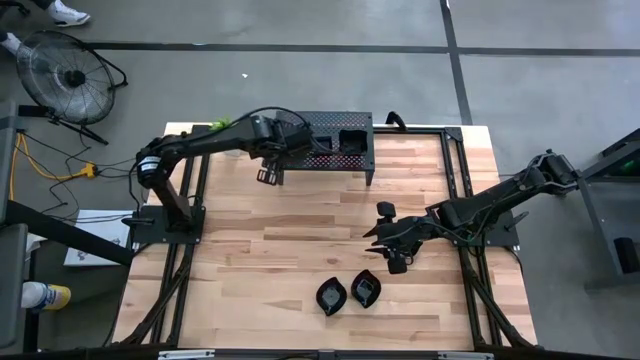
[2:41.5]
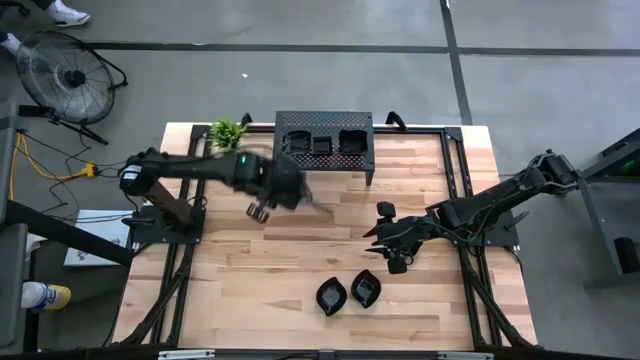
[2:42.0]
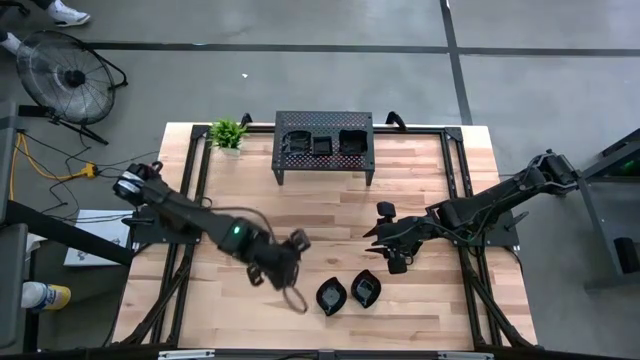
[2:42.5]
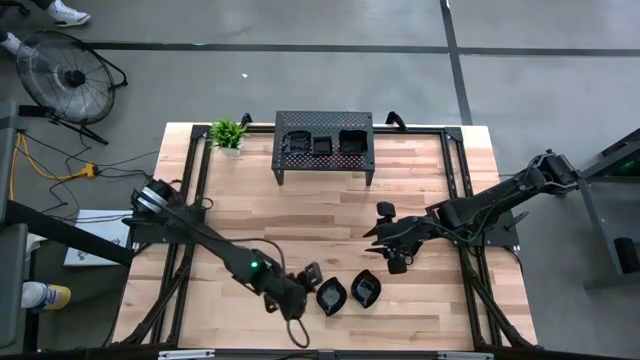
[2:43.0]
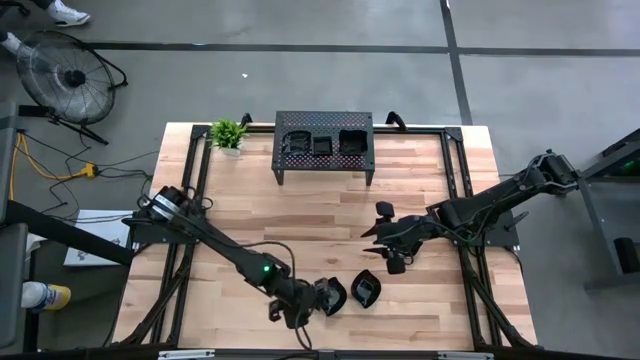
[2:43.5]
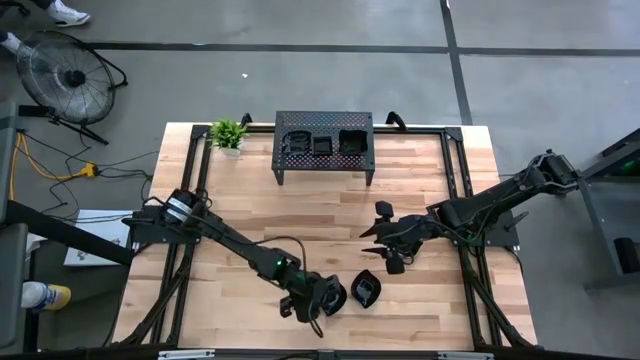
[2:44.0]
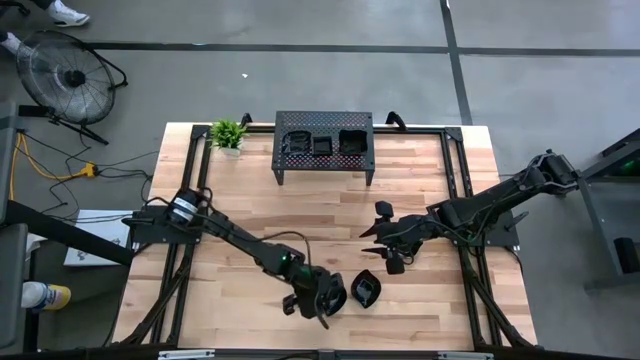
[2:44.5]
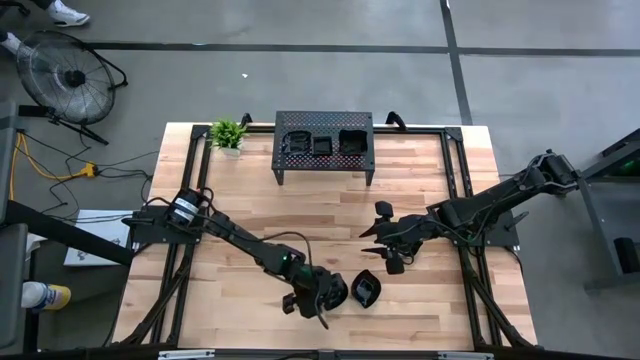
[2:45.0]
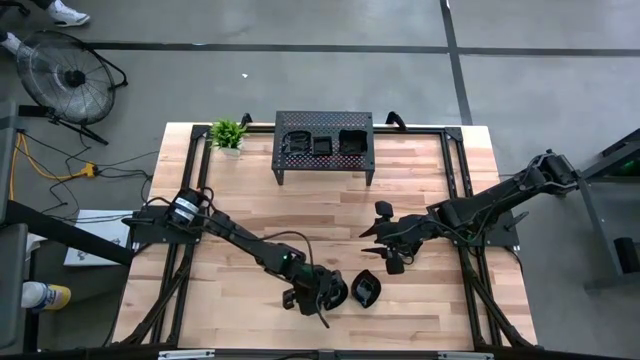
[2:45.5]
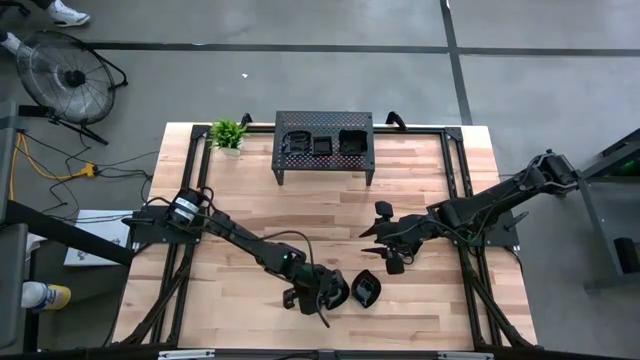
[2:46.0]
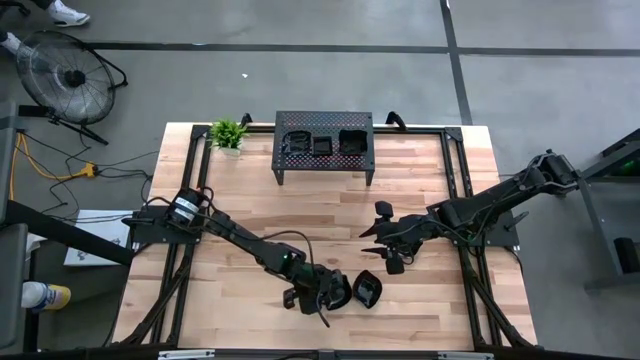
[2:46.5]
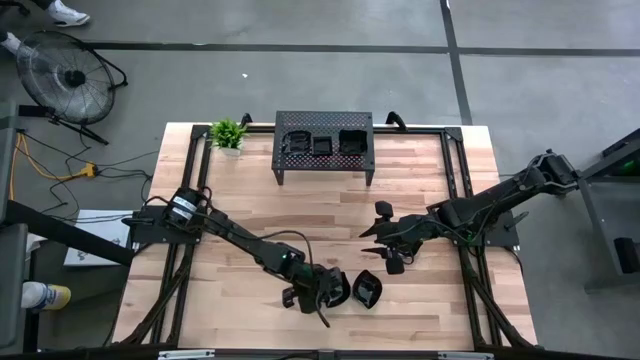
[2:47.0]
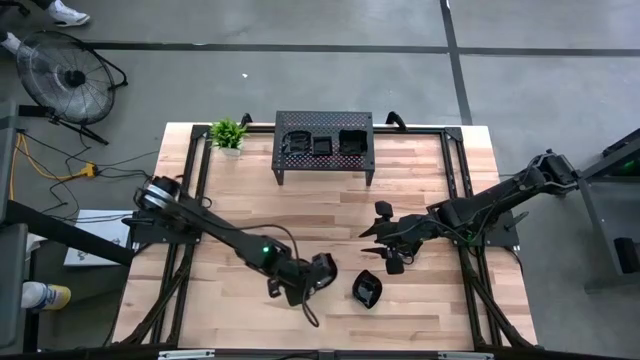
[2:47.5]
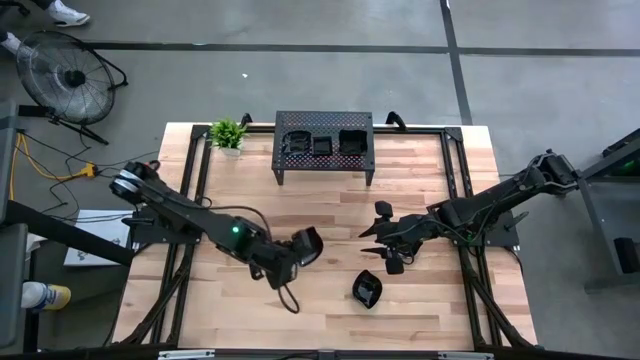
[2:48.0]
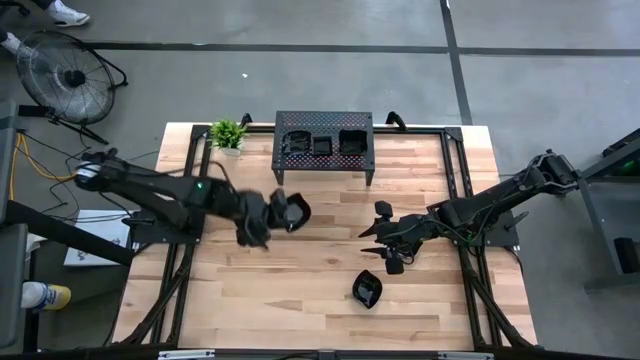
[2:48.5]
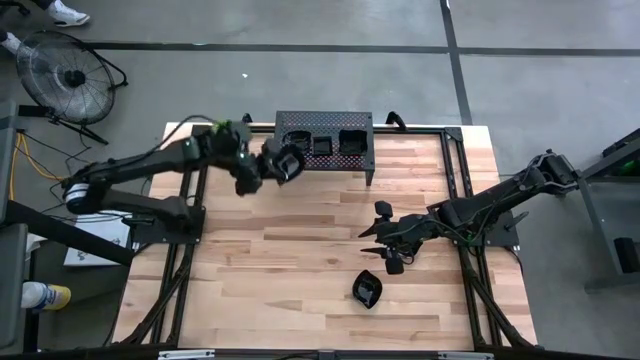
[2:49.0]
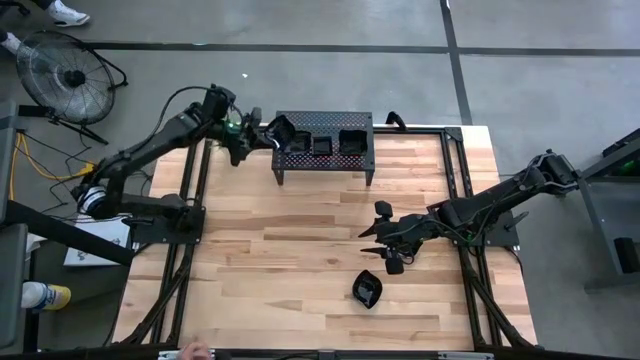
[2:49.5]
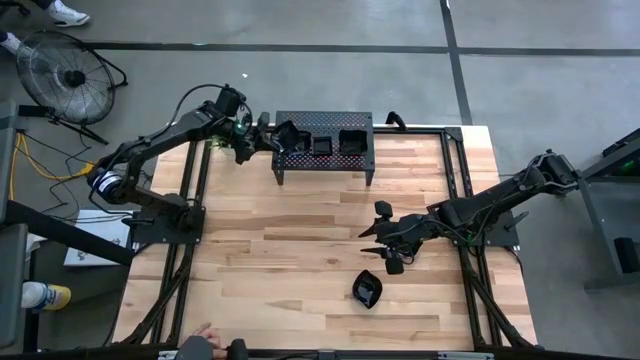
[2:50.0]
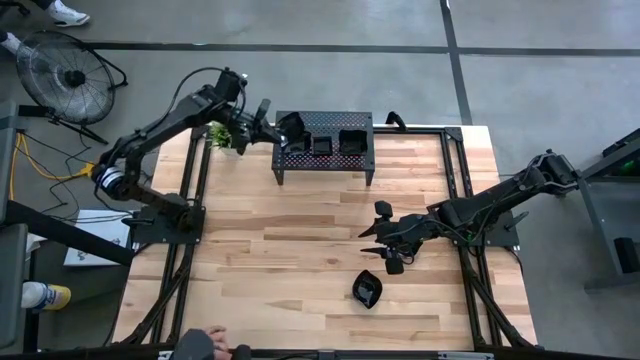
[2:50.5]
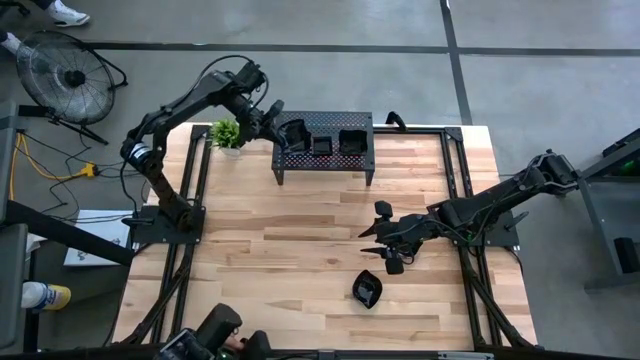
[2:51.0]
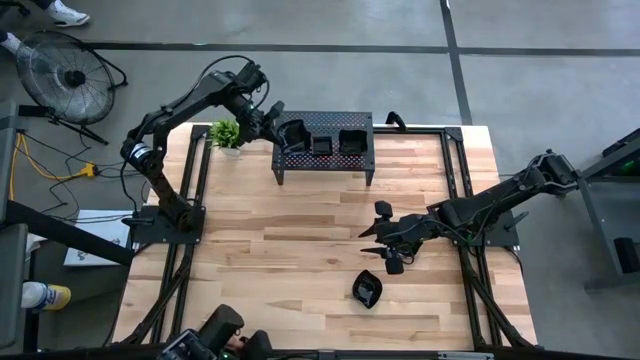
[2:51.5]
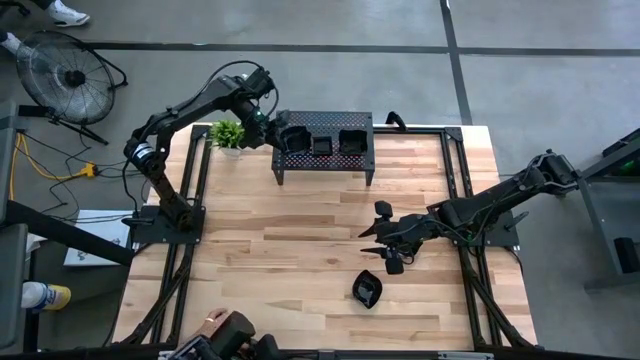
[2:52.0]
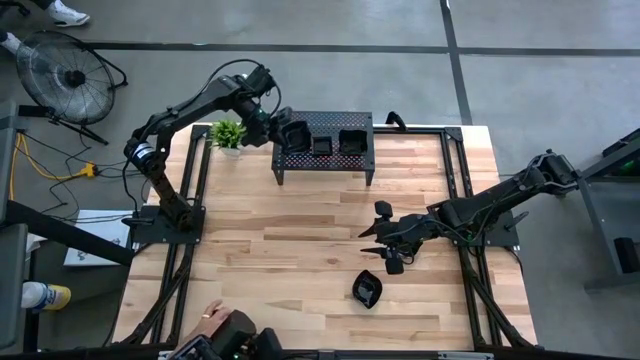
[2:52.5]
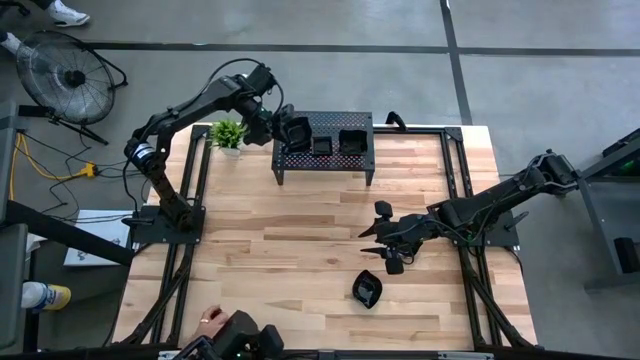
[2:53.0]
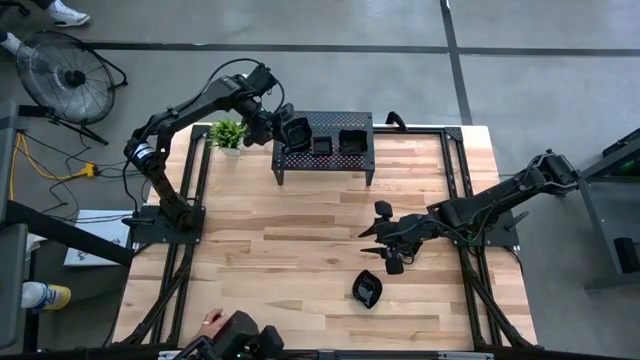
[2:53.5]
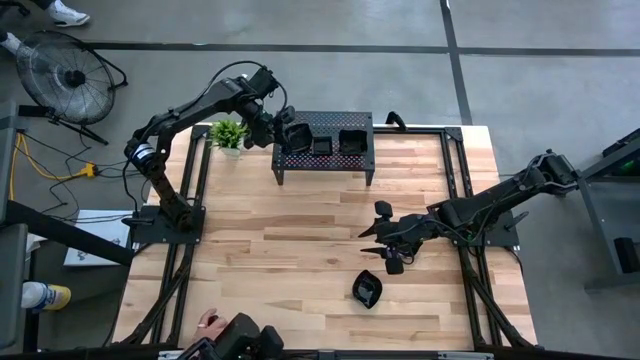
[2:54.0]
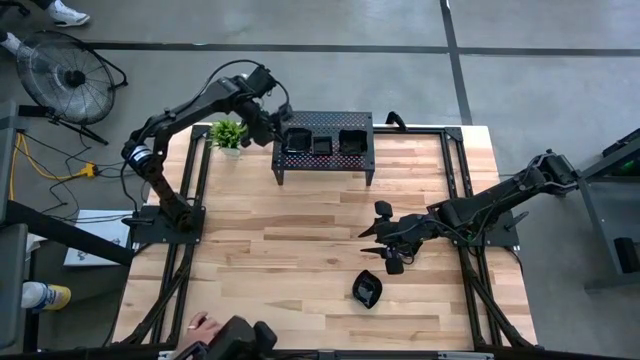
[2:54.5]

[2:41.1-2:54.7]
Task: Pick & Place Mini shaped plates
Stack the leaf-shaped plate on top of the leaf-shaped plate on the shelf

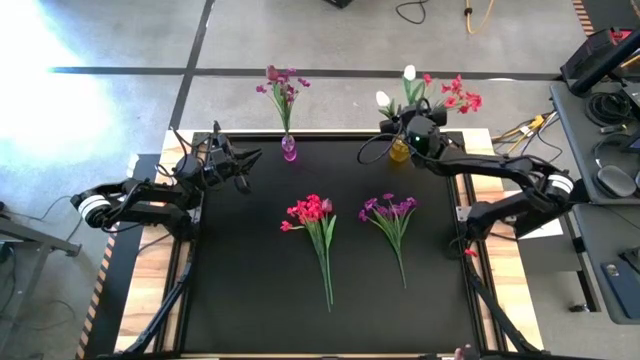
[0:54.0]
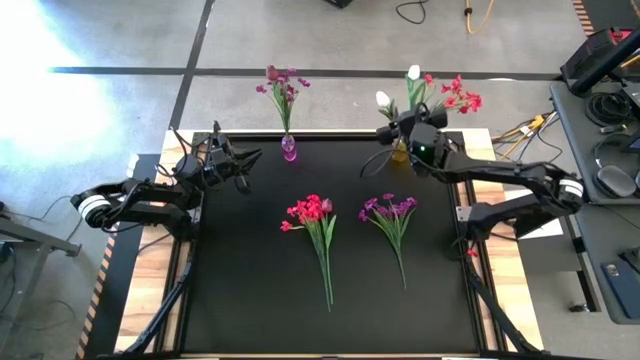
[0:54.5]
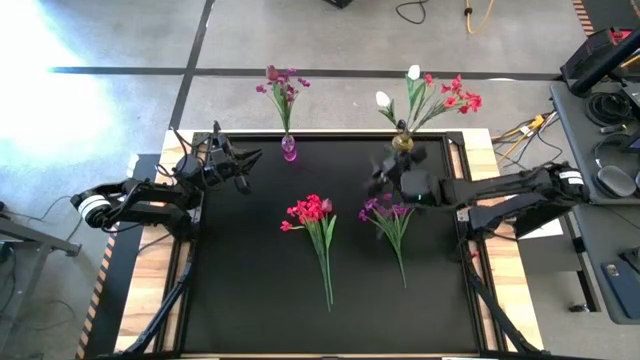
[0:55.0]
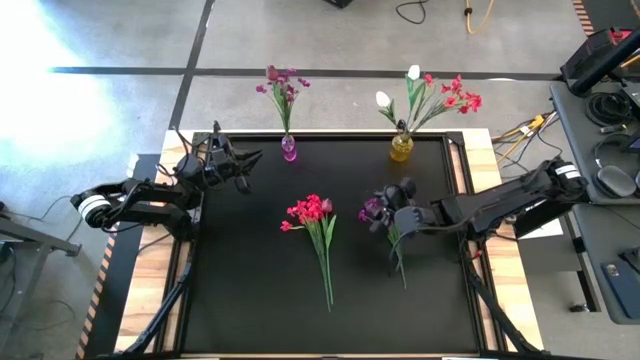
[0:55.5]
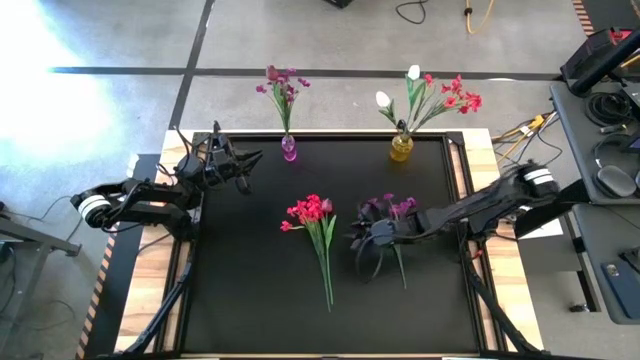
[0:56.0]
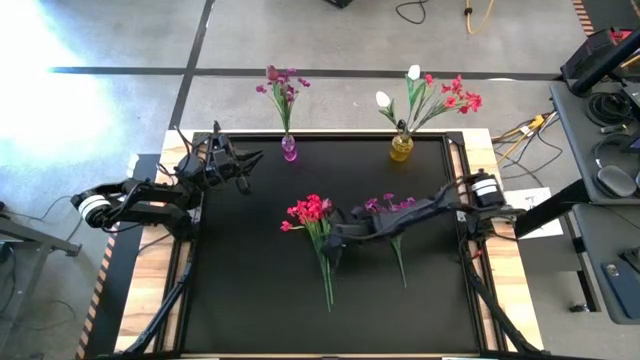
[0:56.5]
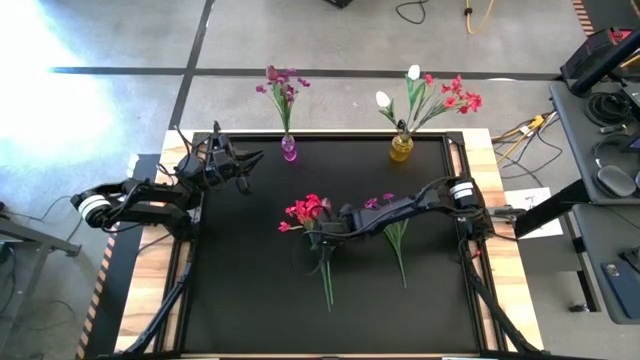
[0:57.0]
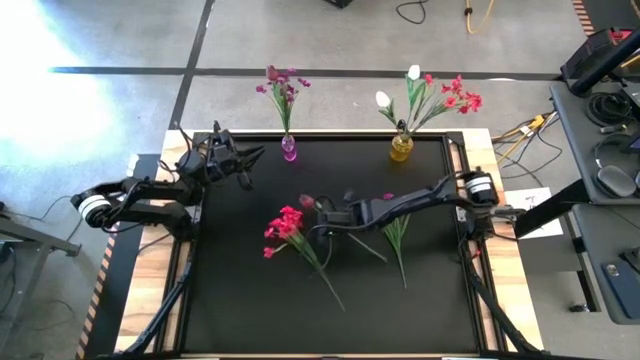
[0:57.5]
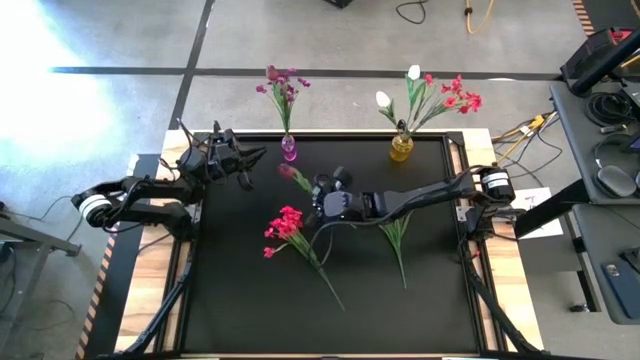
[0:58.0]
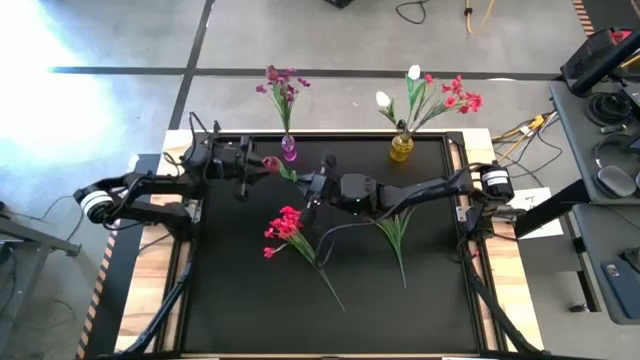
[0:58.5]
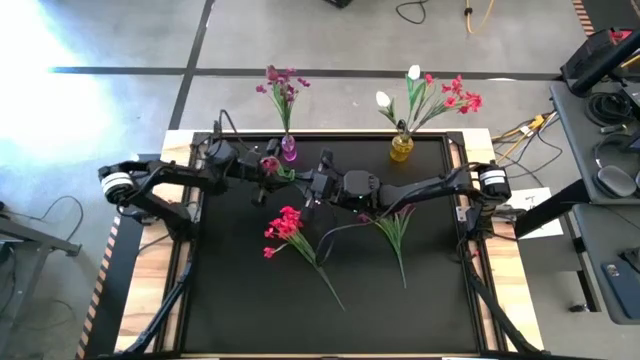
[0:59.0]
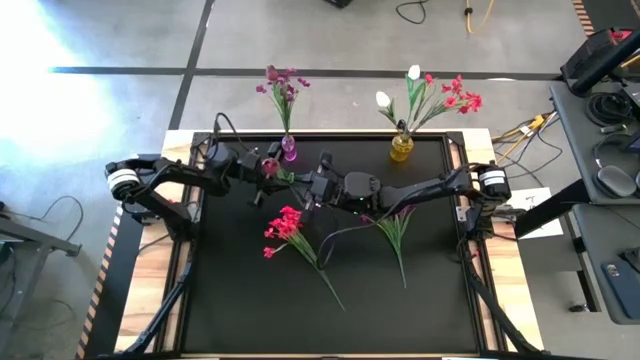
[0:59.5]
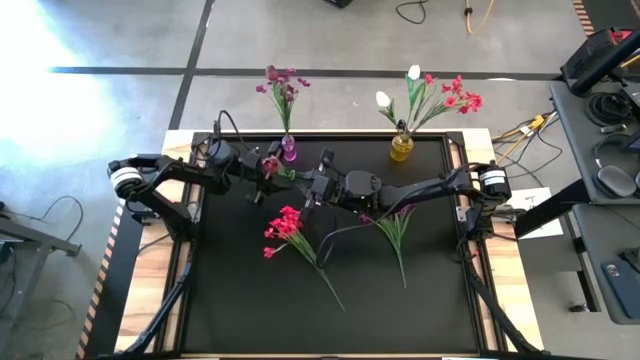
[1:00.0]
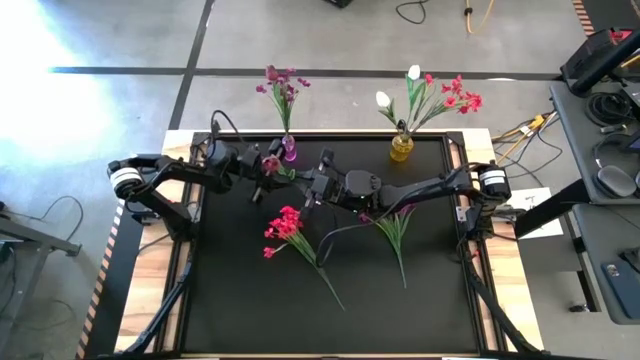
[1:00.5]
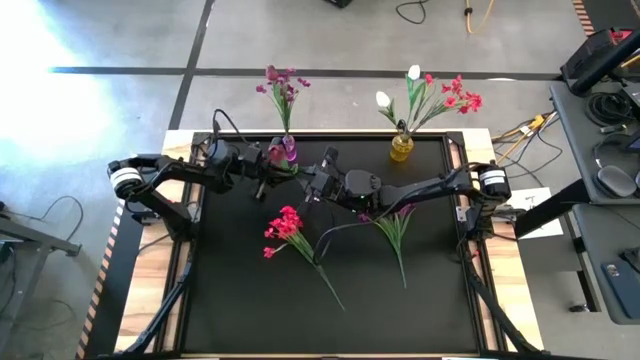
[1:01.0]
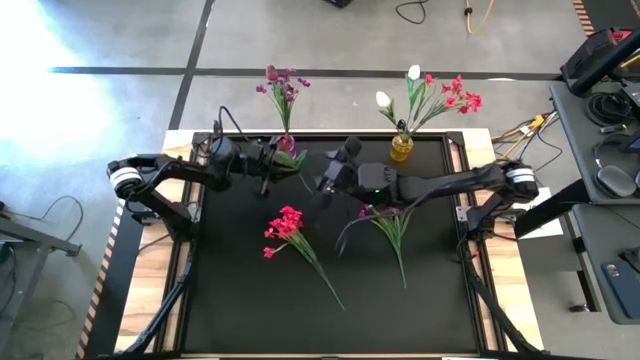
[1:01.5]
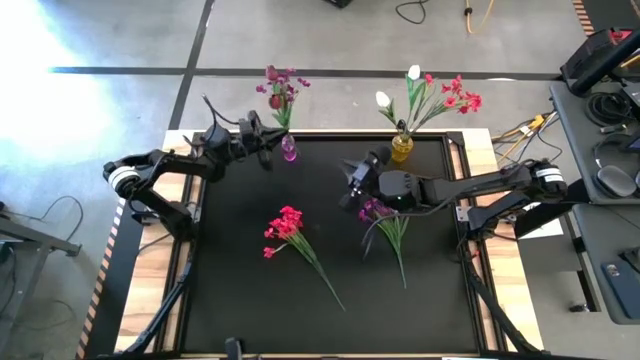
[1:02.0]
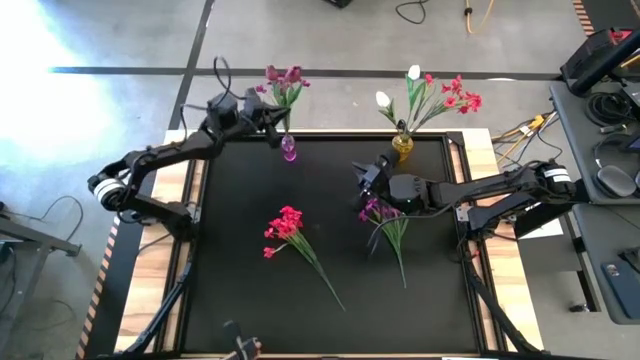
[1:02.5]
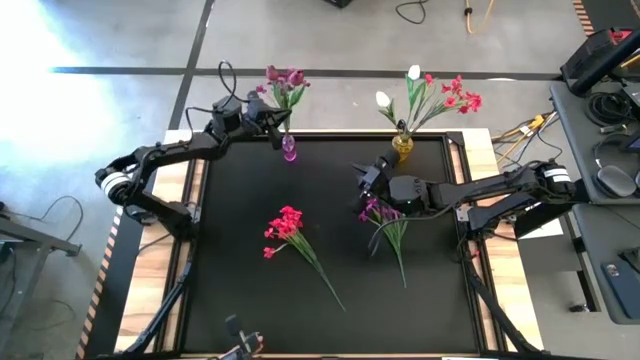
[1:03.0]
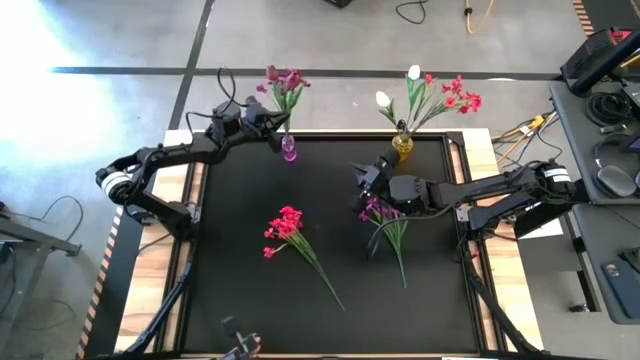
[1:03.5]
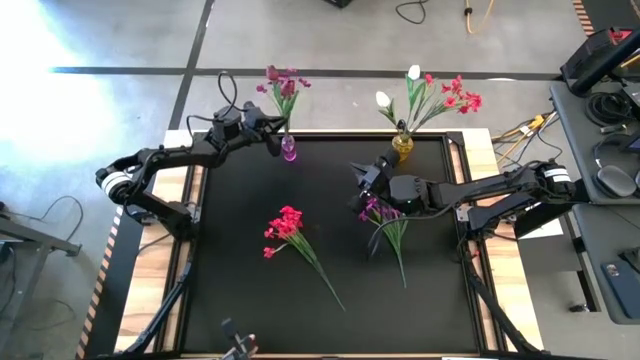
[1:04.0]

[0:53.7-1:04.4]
Task: Sort flowers into vase by color
Put the purple flower into the purple vase
